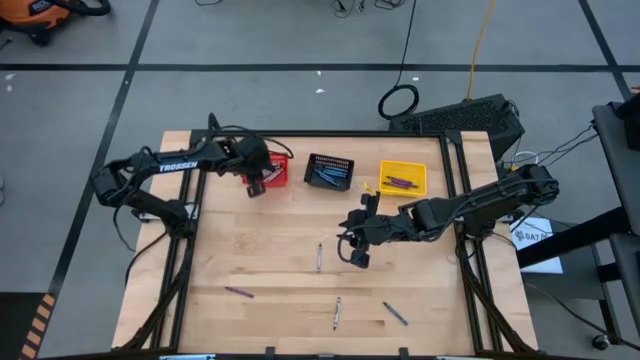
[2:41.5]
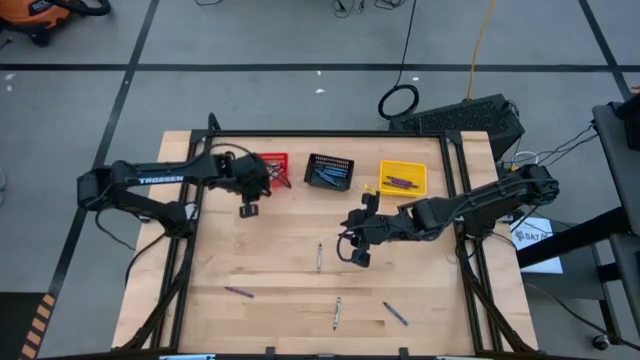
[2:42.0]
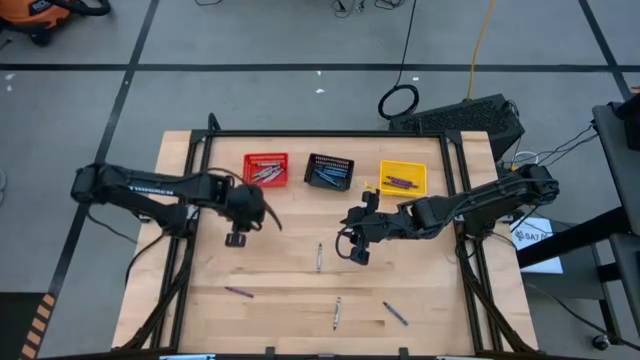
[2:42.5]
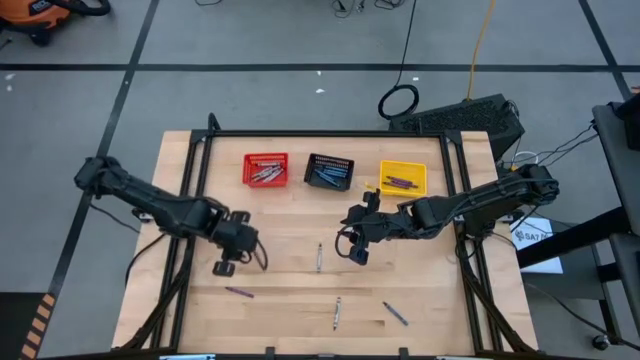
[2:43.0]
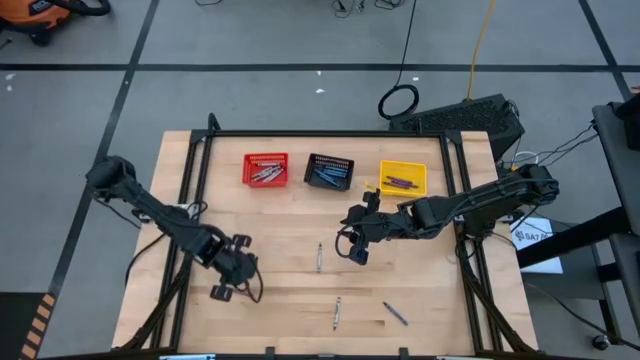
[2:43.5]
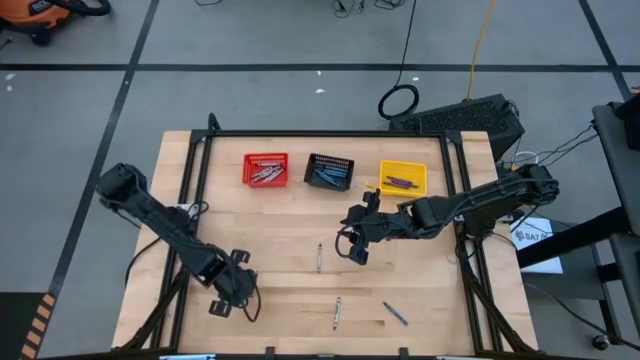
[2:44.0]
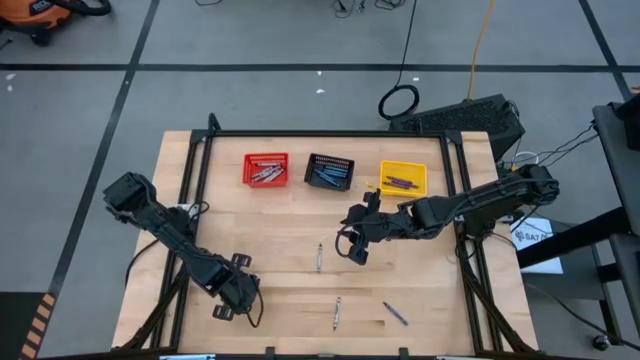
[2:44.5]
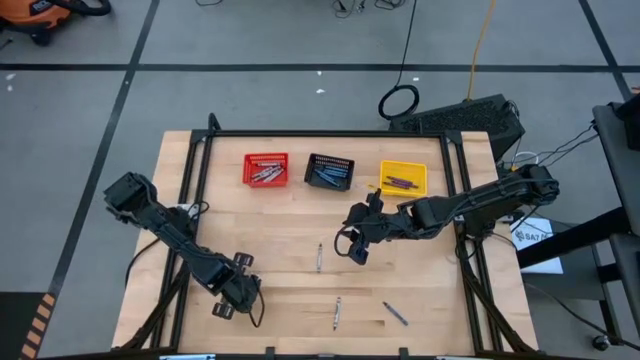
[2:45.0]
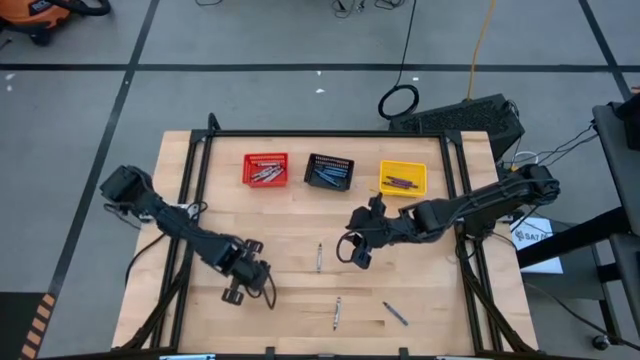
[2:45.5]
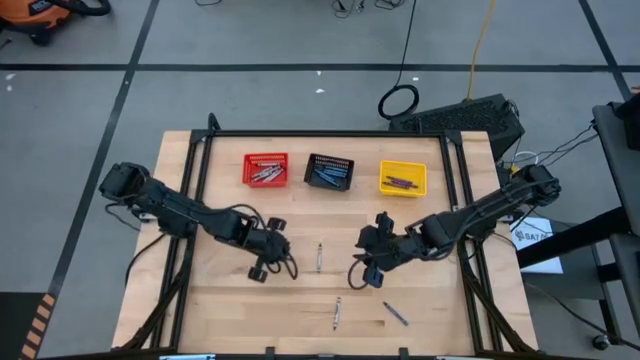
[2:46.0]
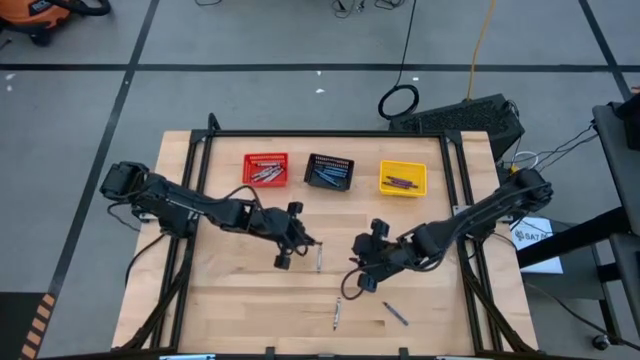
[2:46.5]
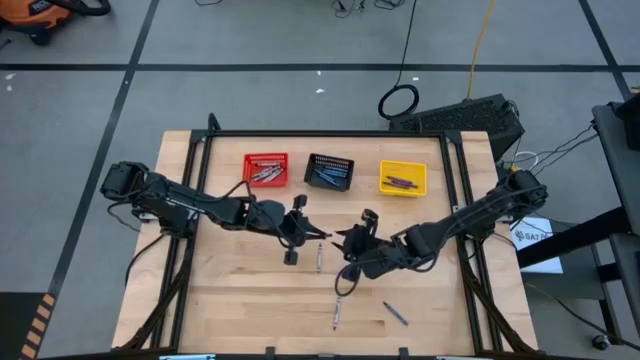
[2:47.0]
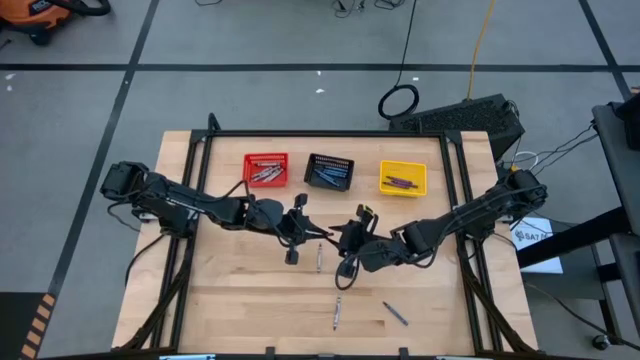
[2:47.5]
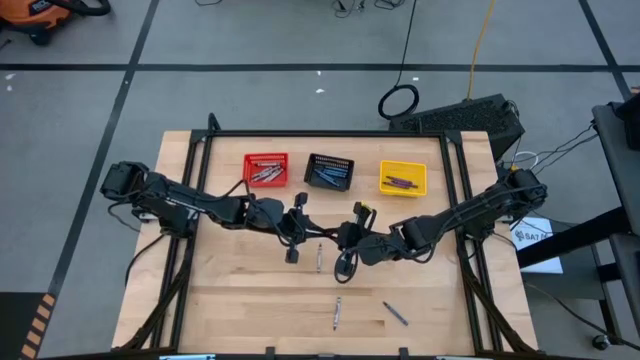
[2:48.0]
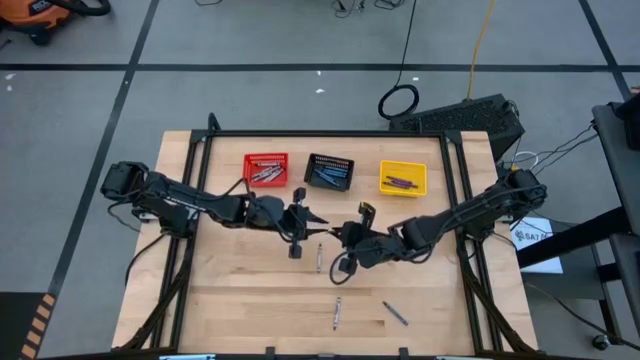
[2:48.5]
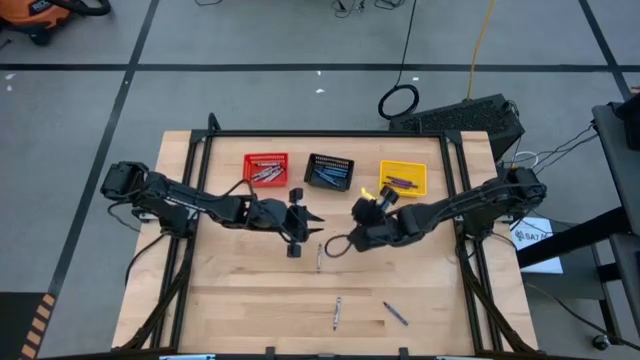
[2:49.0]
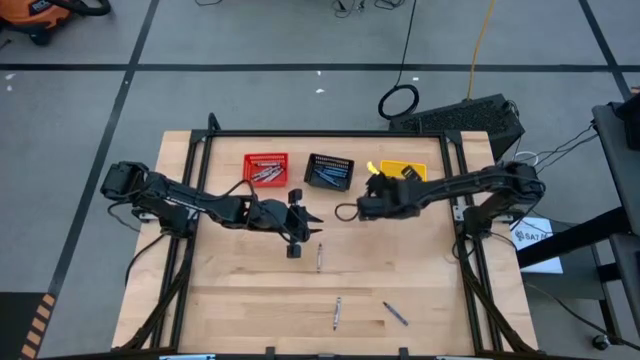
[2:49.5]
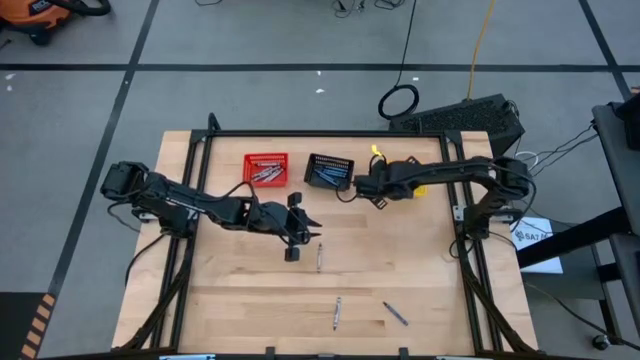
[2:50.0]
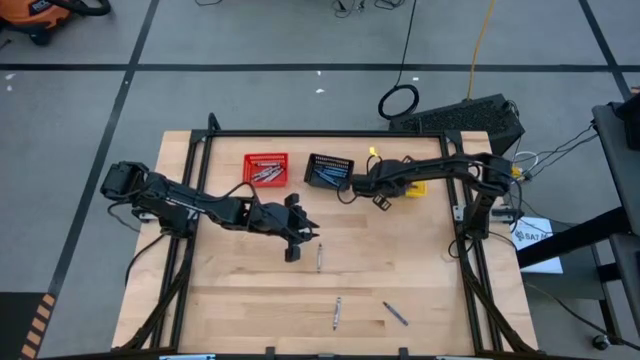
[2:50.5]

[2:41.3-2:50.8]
Task: Sort crayons
Put the violet crayon into the yellow bin

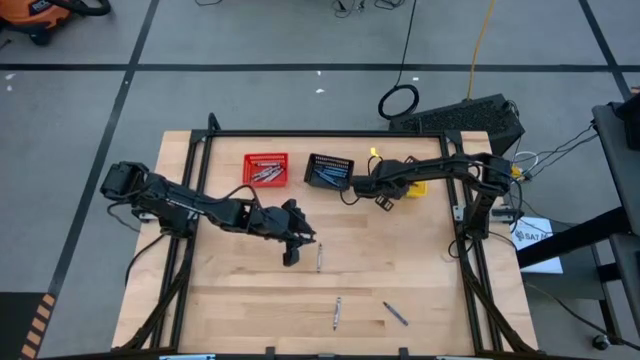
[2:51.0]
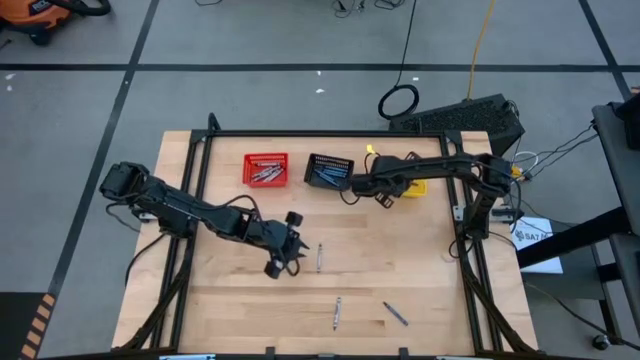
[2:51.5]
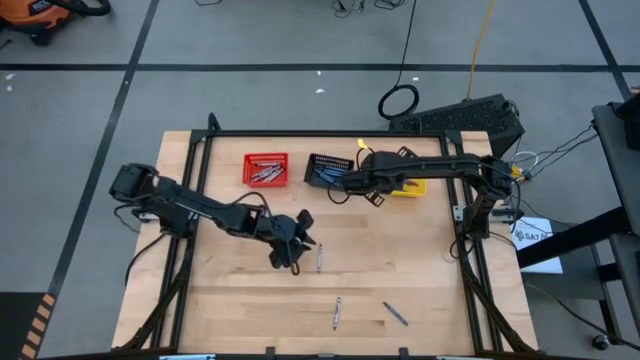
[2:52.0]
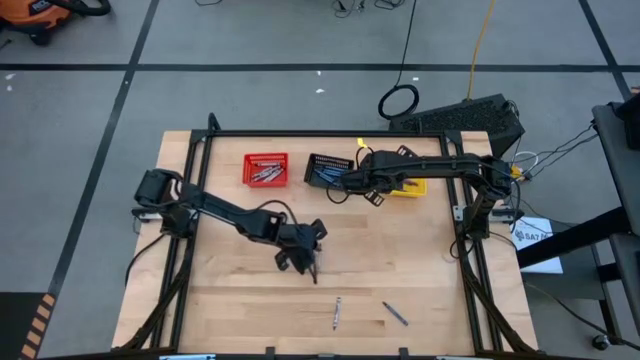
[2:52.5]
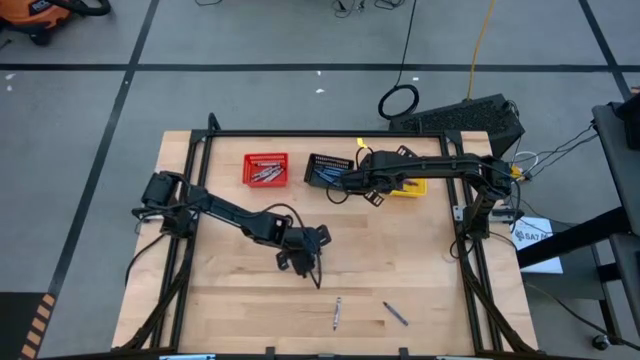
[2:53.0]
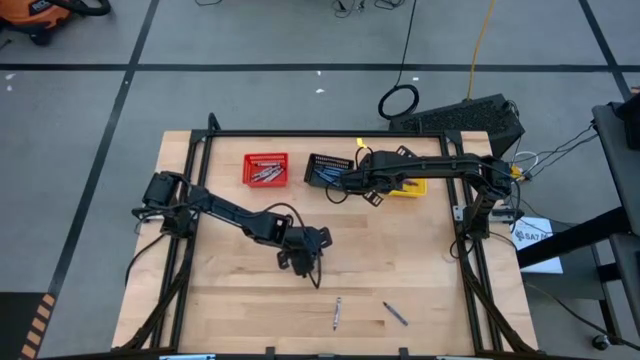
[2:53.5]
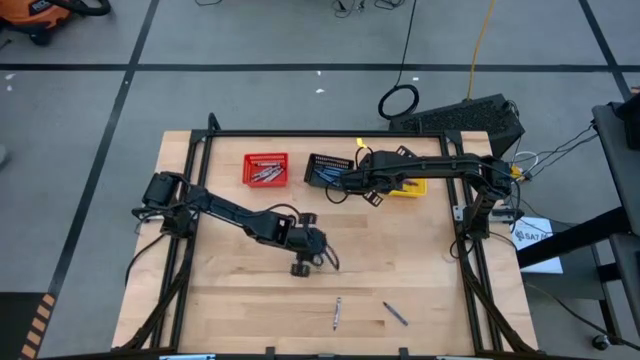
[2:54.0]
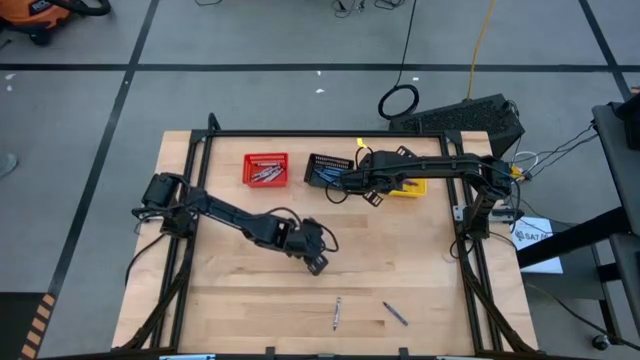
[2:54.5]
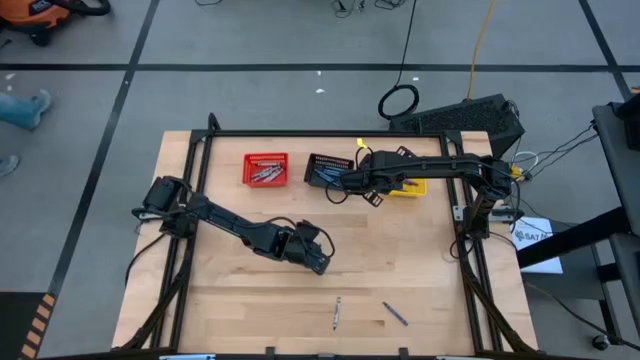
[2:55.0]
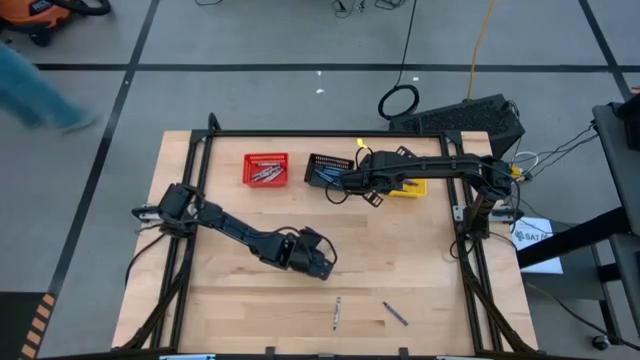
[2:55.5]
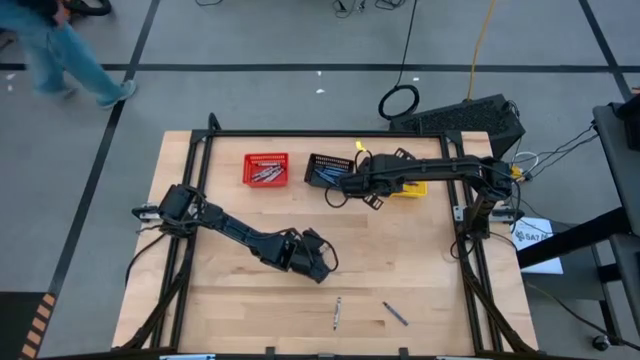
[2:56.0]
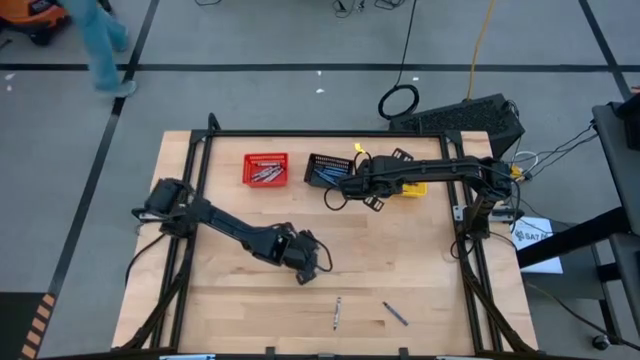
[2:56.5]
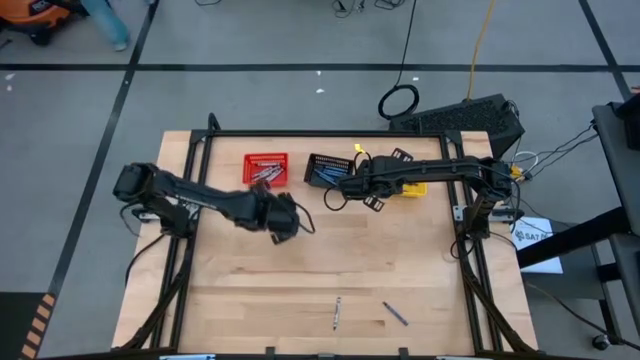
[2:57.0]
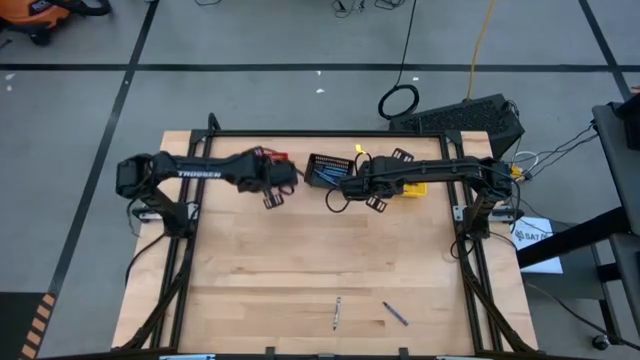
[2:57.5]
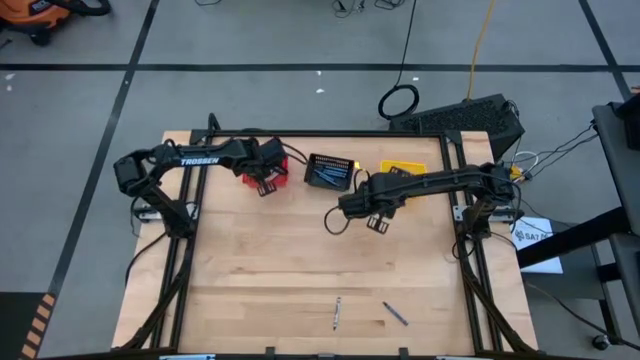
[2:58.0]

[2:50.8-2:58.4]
Put the gray crayon into the red bin

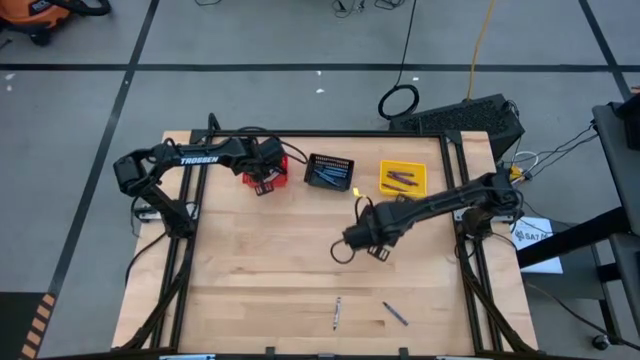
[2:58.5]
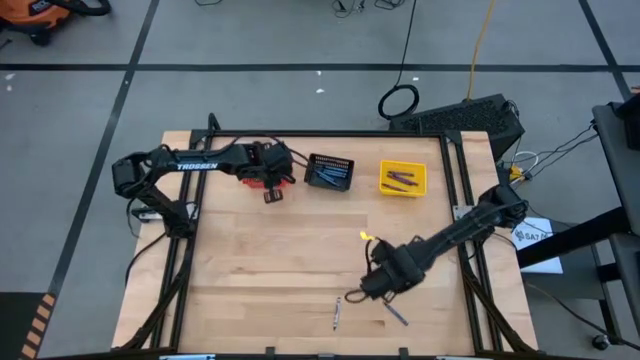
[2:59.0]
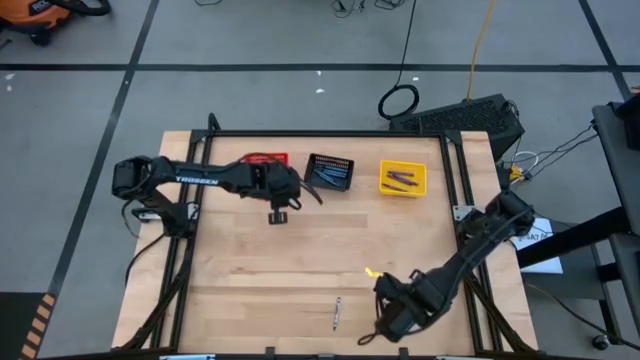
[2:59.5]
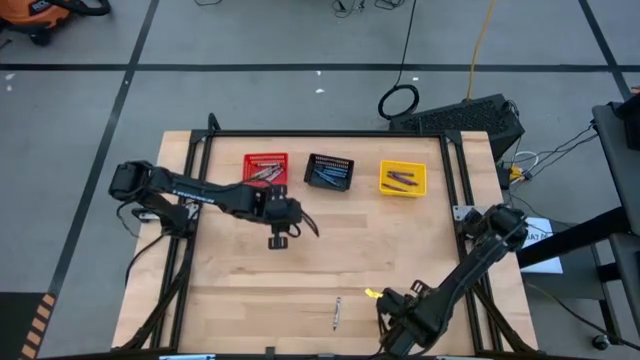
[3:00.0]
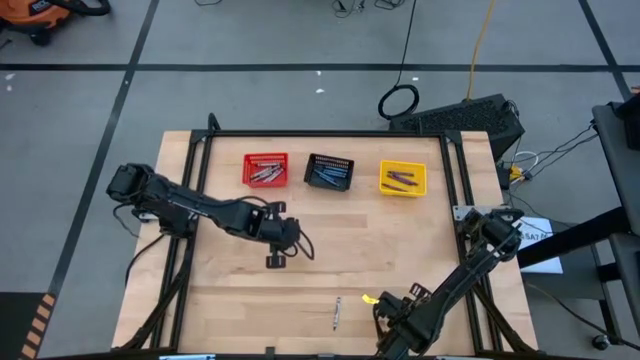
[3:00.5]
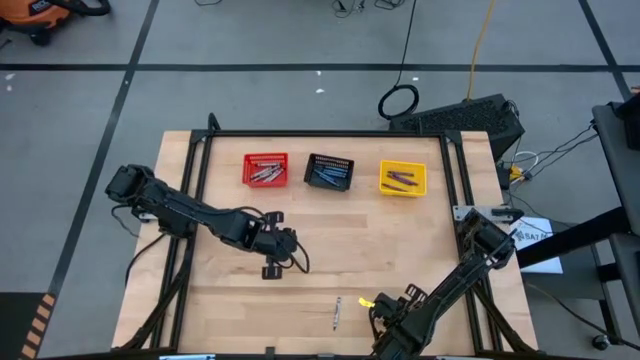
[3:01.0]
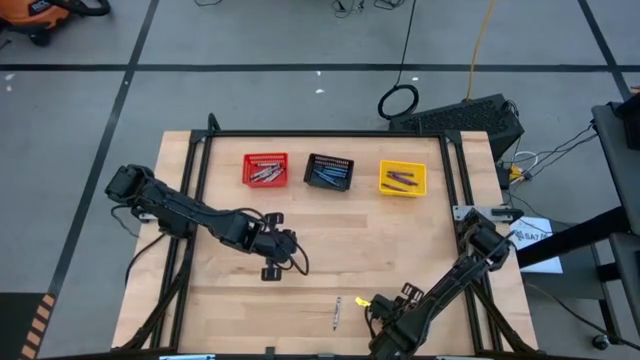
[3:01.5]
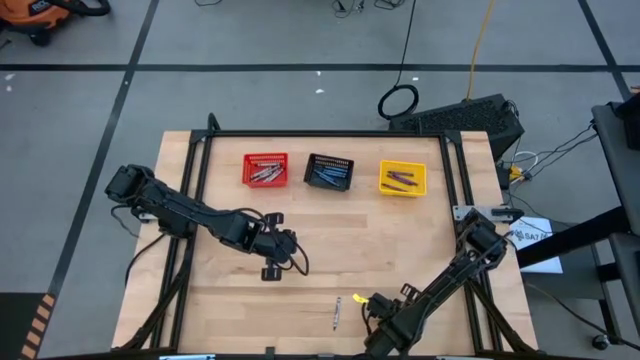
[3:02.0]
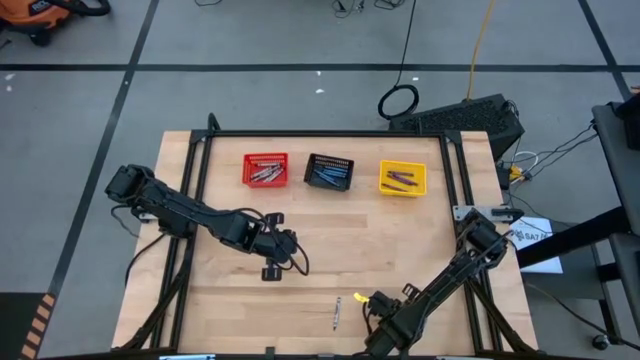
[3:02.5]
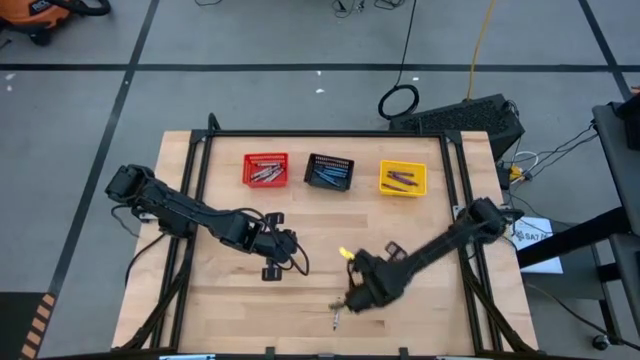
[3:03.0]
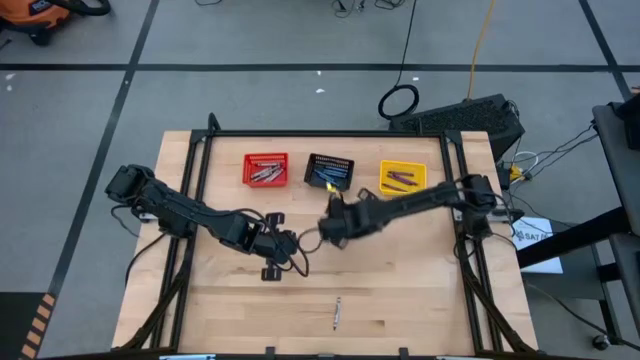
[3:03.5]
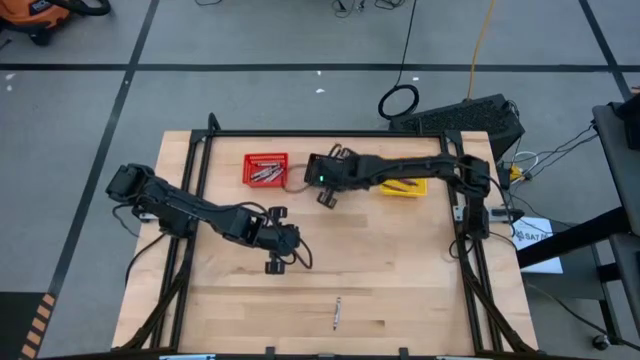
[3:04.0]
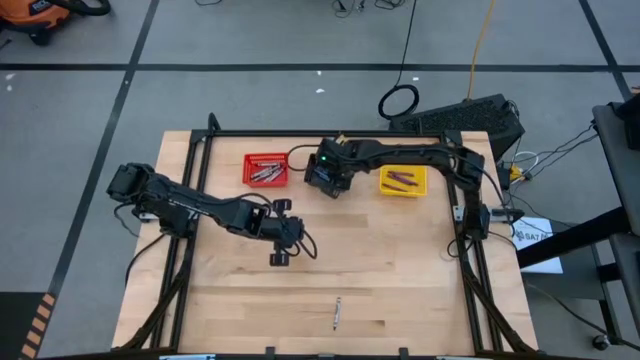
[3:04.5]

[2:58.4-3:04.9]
Put the blue crayon into the black bin
